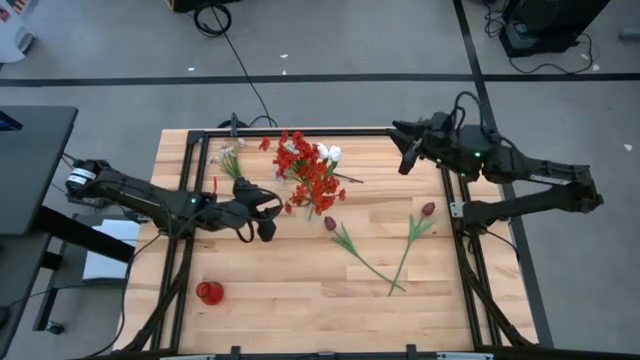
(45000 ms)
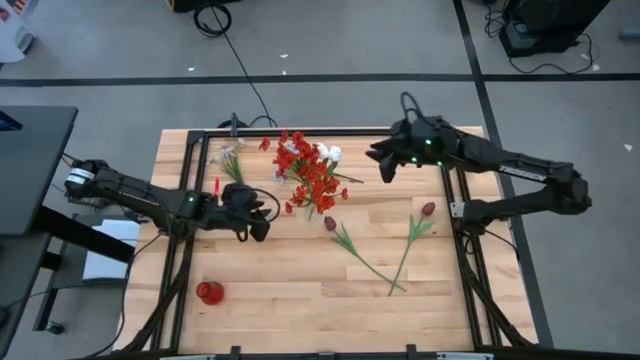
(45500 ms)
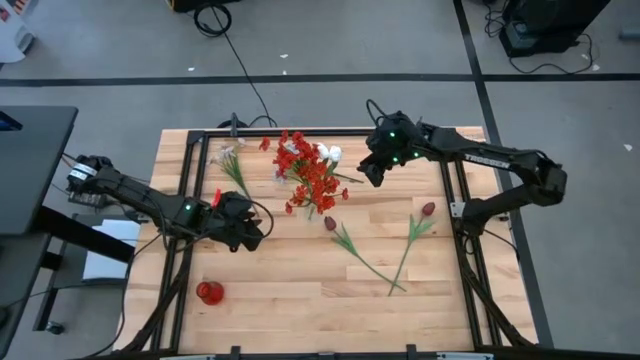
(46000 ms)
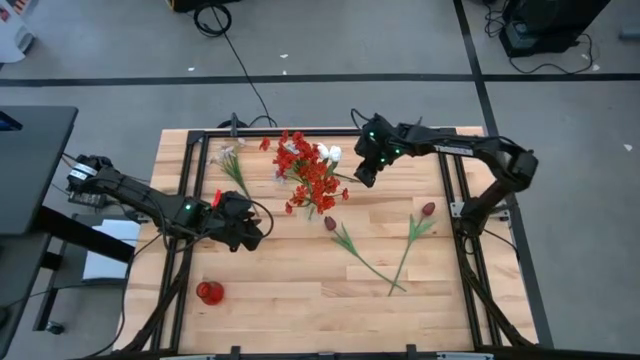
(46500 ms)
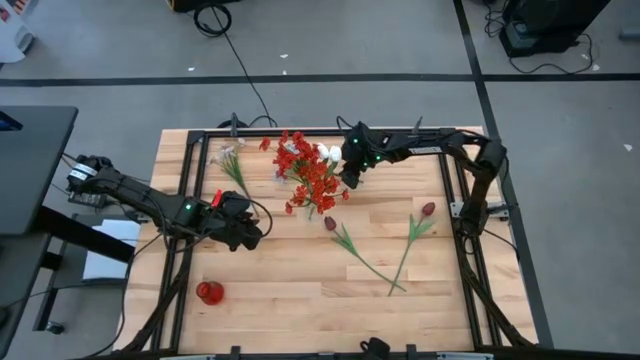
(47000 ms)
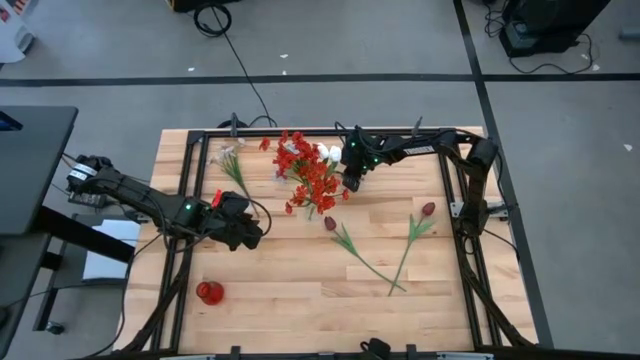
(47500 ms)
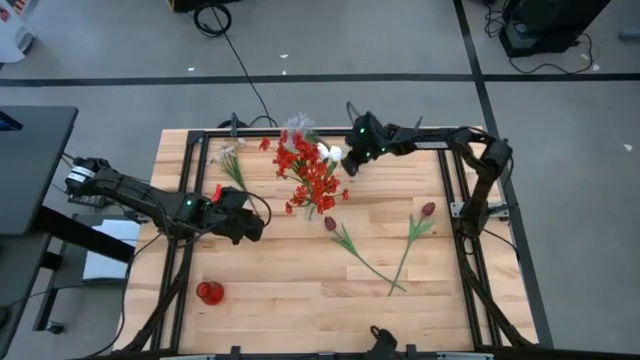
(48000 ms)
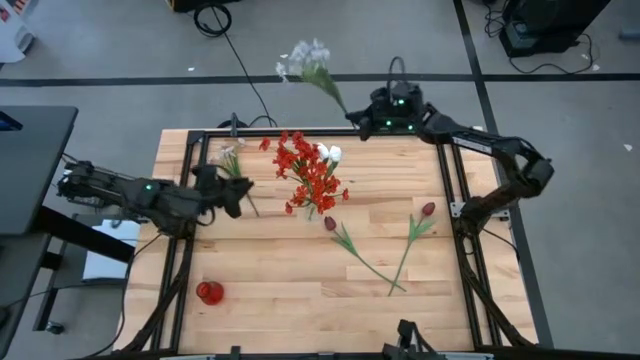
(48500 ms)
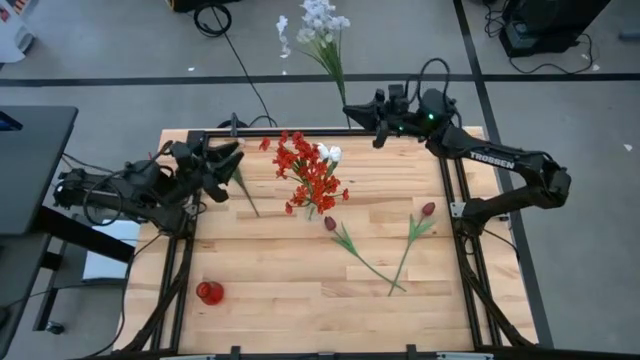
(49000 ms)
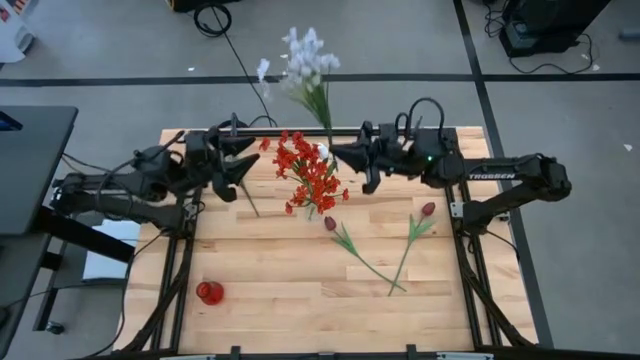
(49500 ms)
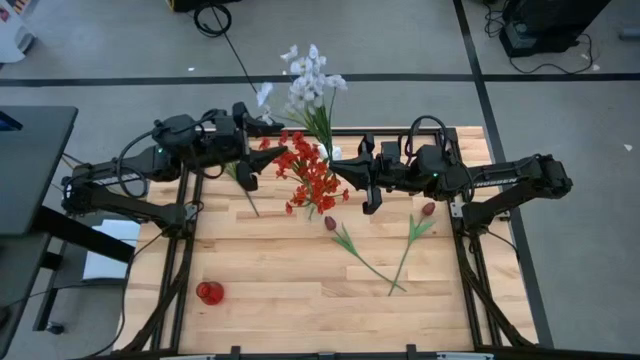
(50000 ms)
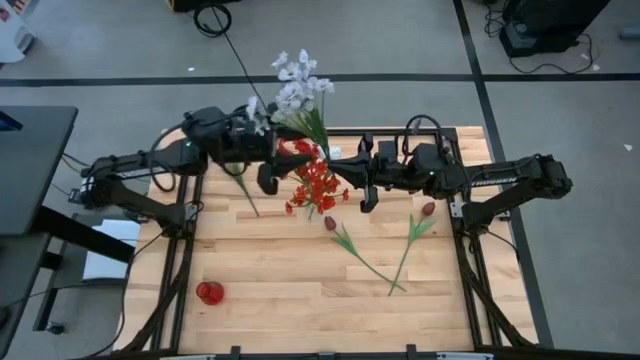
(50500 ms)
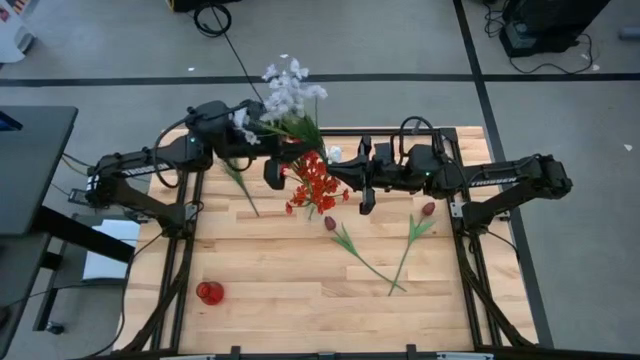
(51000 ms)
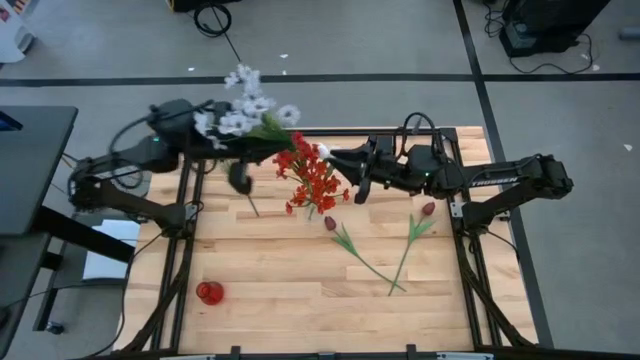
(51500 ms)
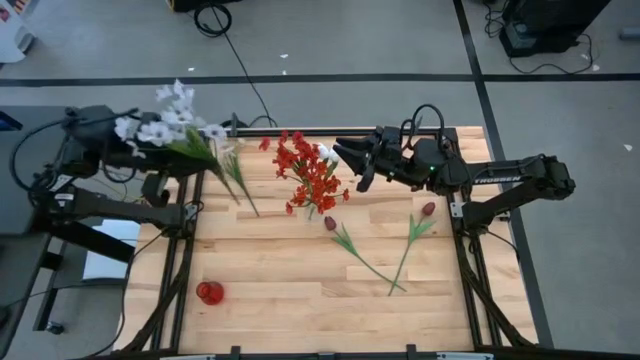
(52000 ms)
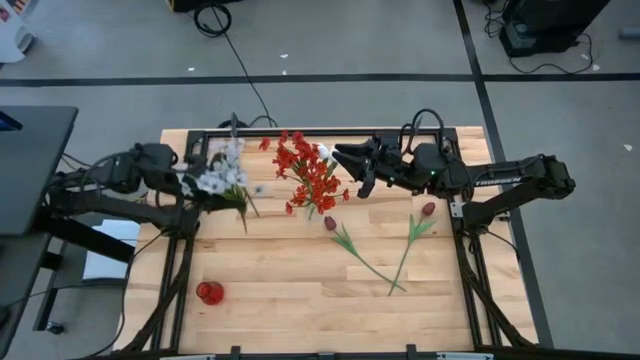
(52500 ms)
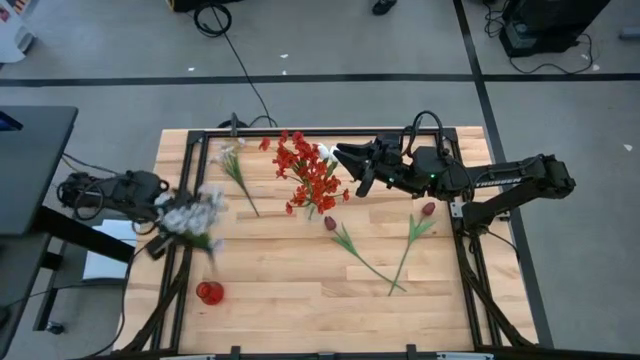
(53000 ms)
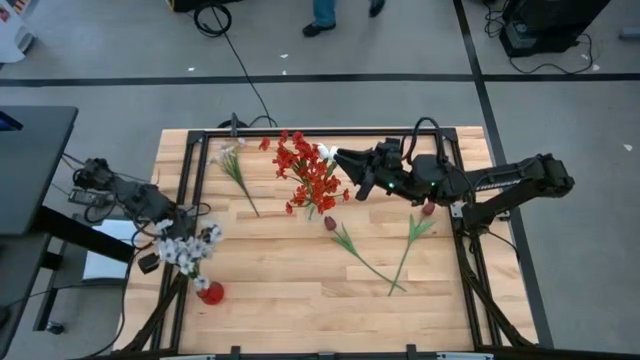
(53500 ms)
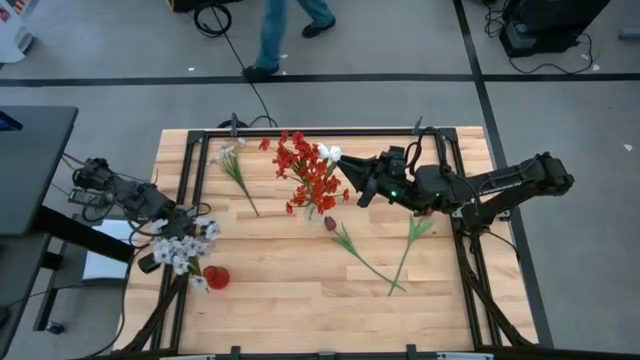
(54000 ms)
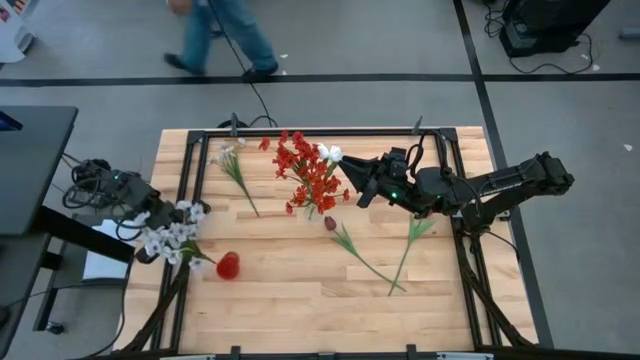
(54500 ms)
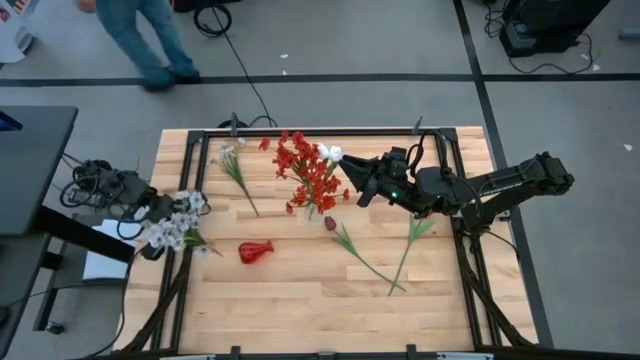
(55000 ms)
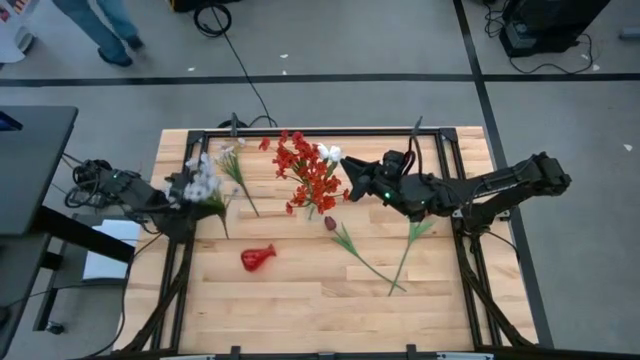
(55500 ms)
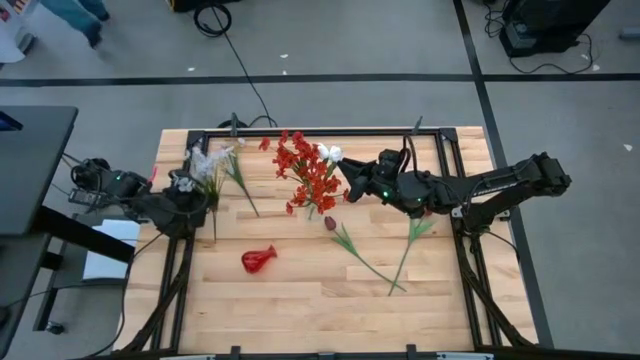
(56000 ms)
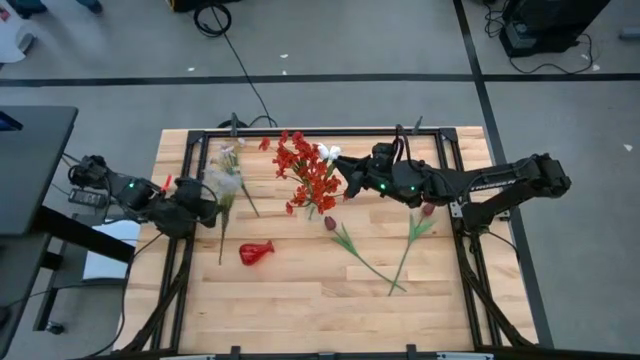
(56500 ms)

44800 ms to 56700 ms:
Task: Sort flowers into vase by color
Put the right white flowers into the red vase

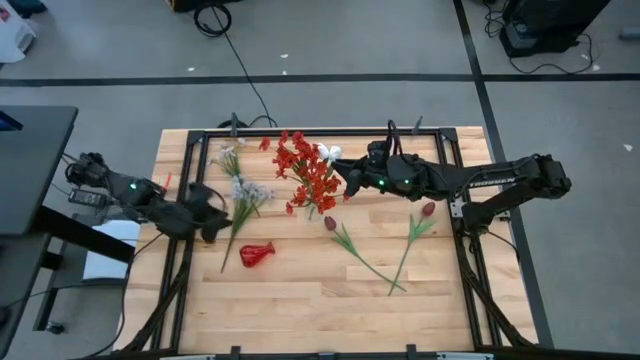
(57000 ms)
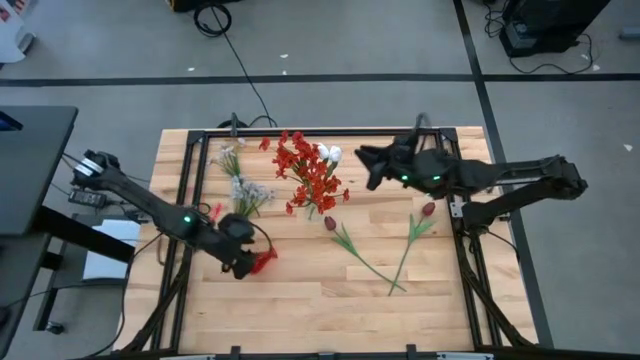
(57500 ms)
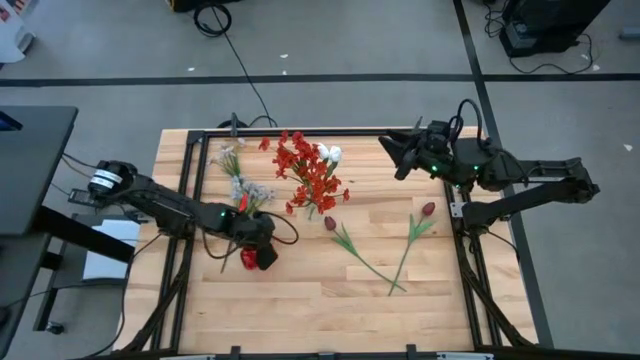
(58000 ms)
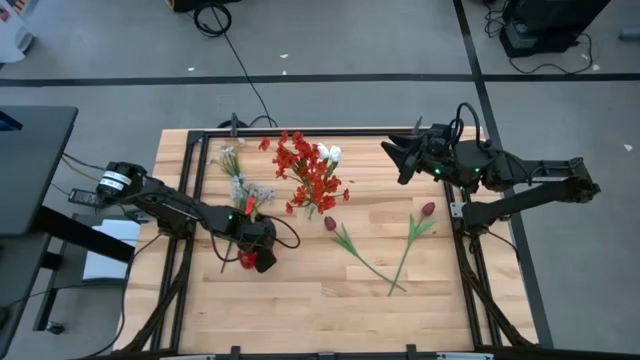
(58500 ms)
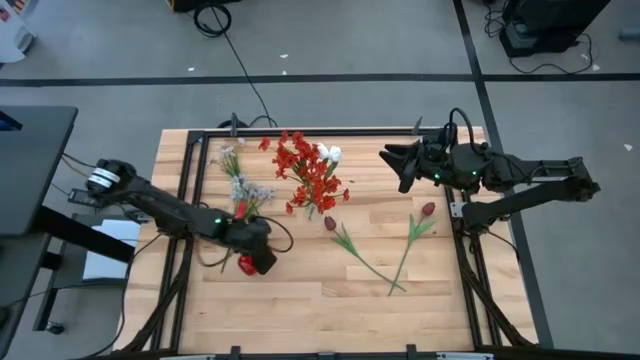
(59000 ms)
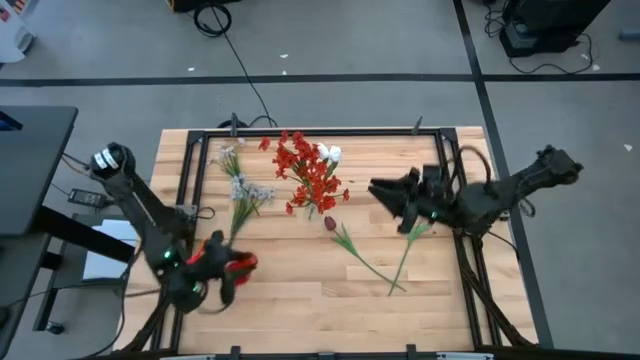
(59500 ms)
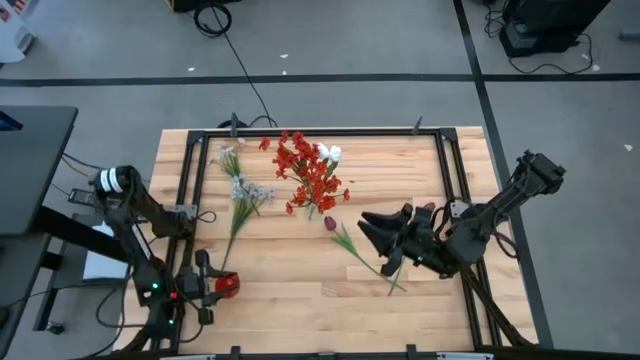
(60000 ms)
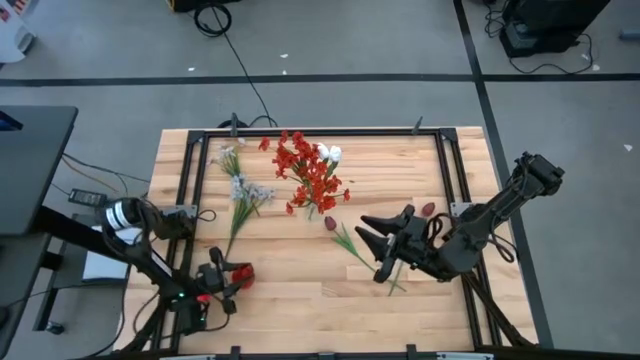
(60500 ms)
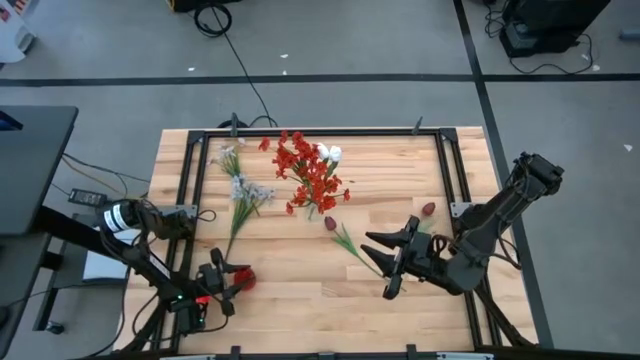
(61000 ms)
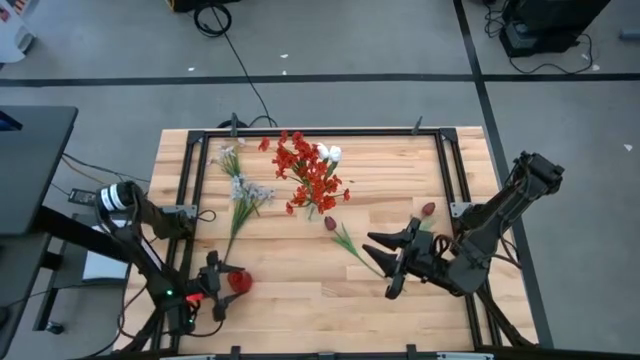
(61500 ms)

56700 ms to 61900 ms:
Adjust the red vase

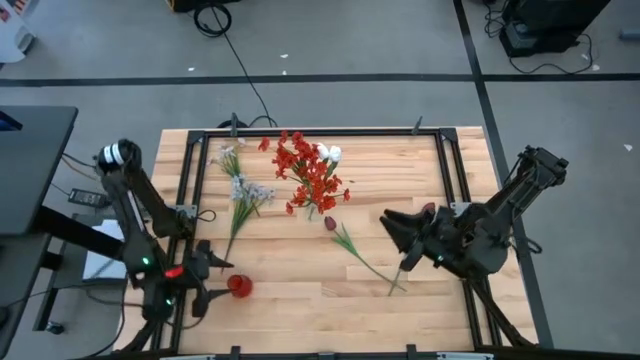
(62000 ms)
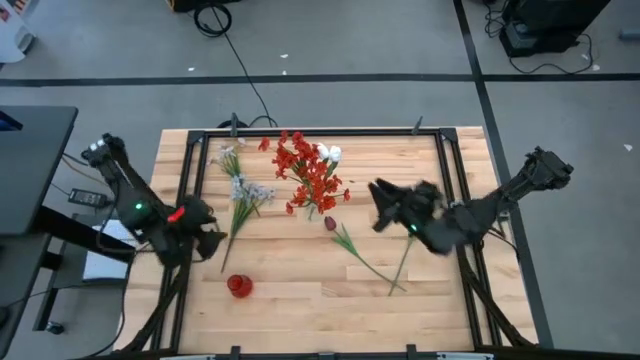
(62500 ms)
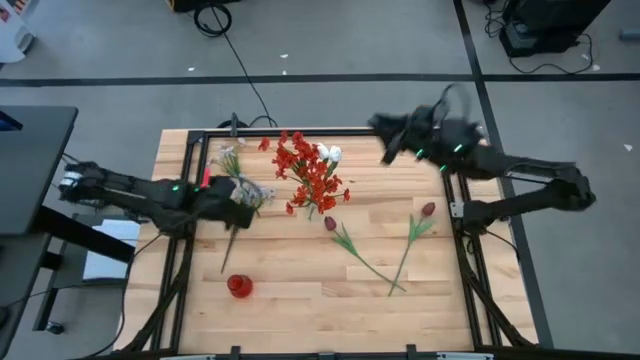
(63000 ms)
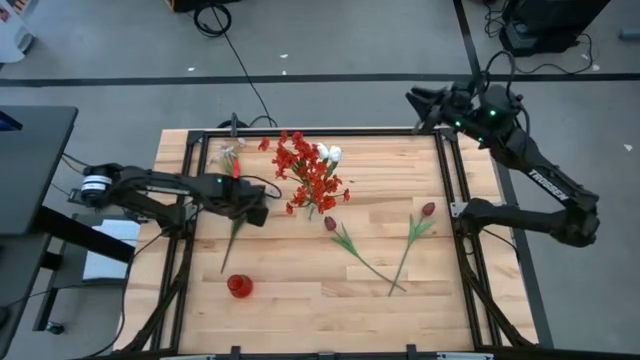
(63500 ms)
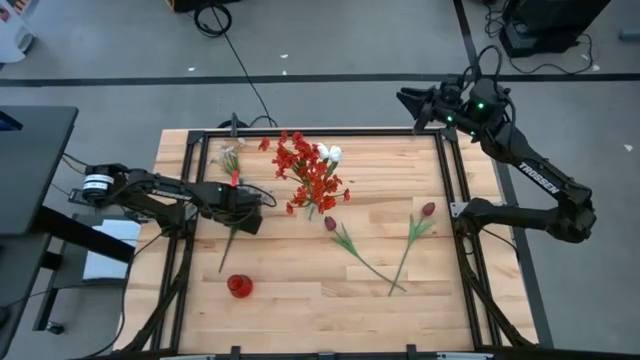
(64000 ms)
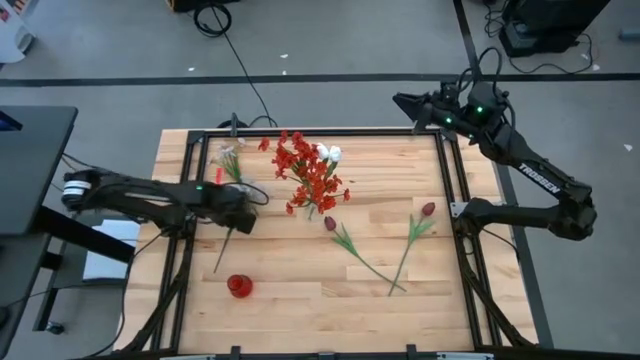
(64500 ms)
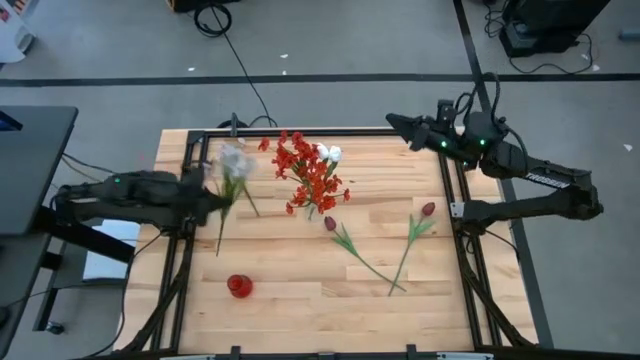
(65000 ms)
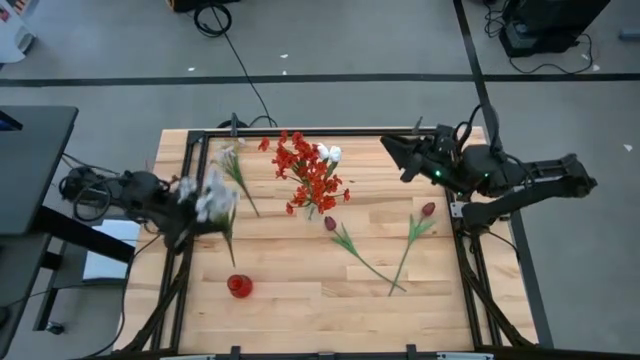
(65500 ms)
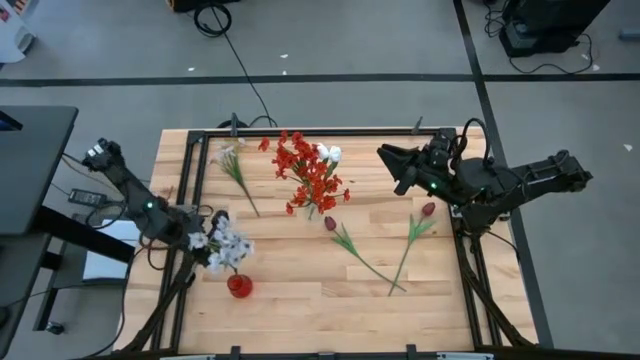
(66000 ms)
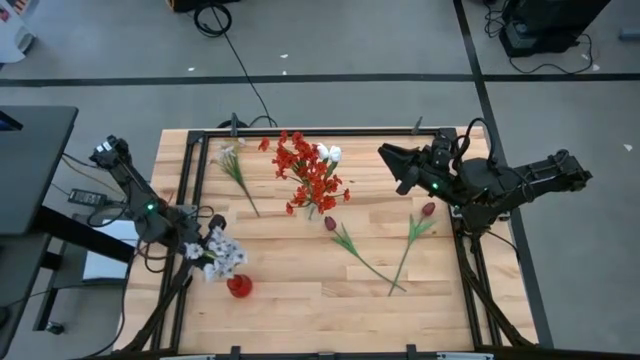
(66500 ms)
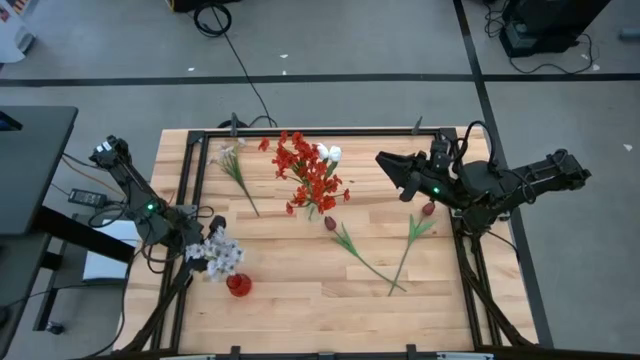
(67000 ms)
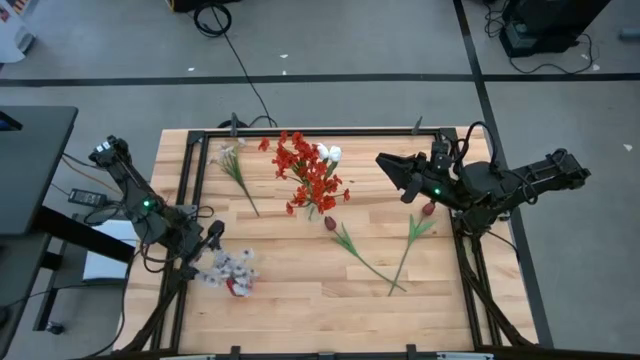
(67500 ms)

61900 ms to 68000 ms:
Put the bottom white flowers into the red vase
